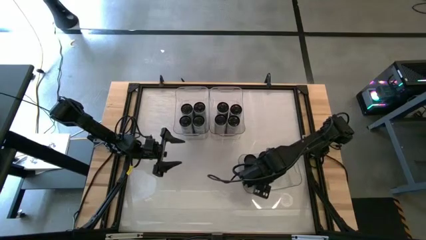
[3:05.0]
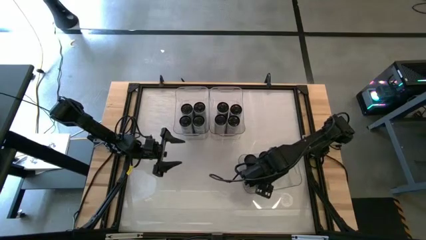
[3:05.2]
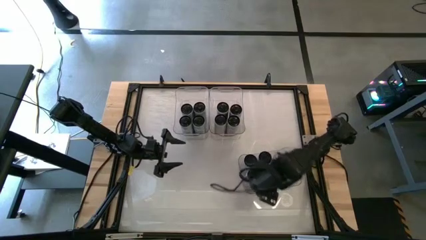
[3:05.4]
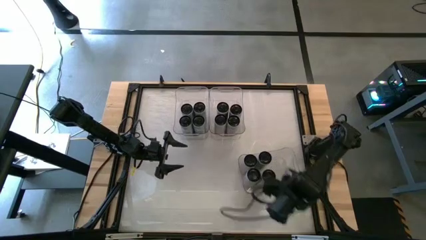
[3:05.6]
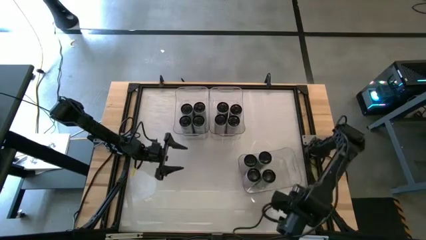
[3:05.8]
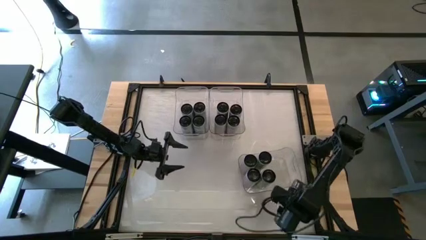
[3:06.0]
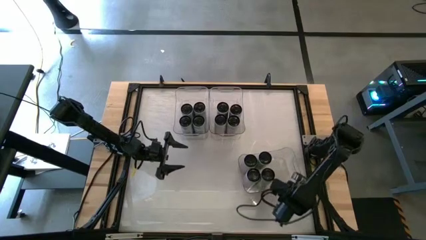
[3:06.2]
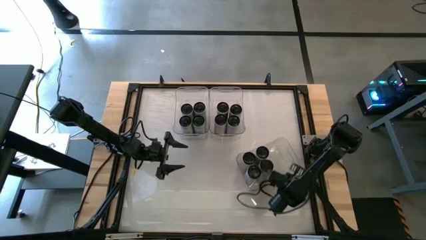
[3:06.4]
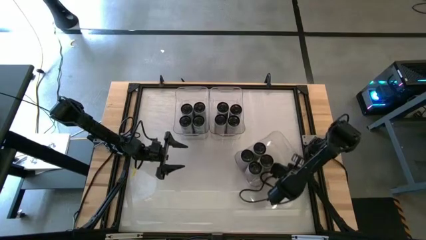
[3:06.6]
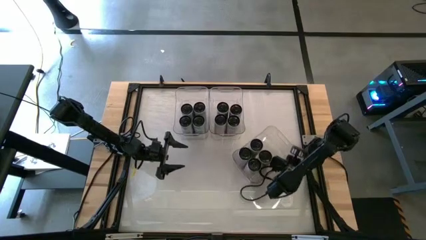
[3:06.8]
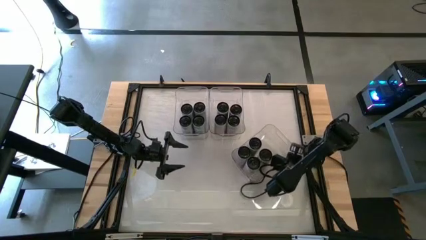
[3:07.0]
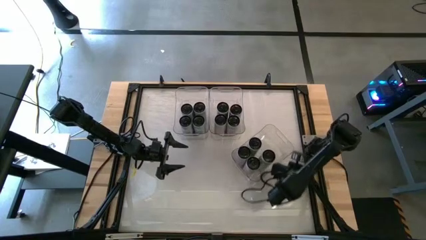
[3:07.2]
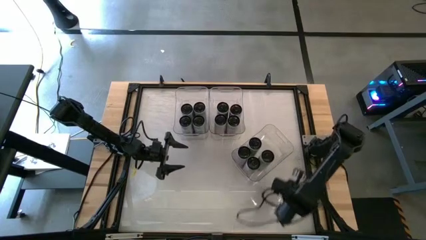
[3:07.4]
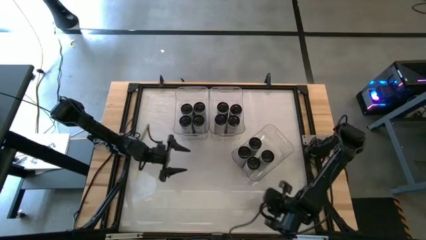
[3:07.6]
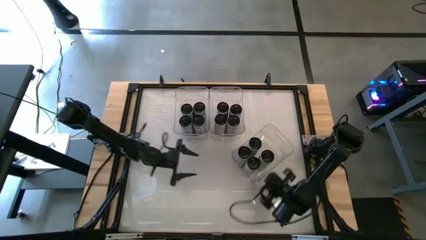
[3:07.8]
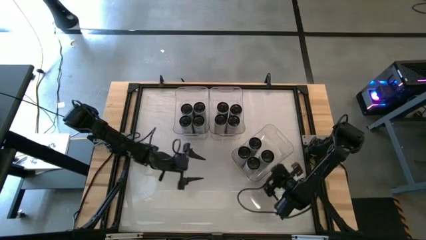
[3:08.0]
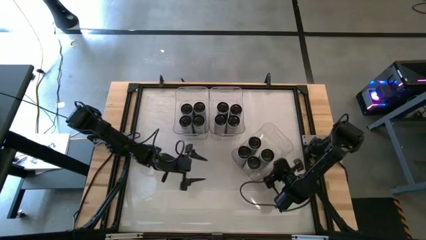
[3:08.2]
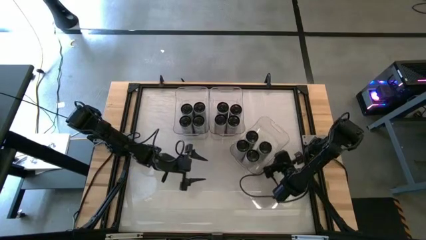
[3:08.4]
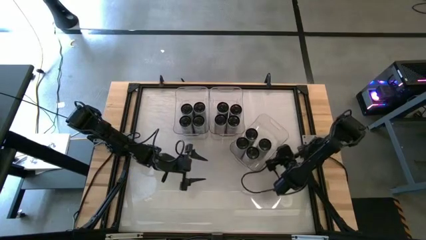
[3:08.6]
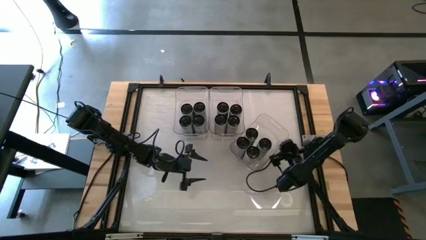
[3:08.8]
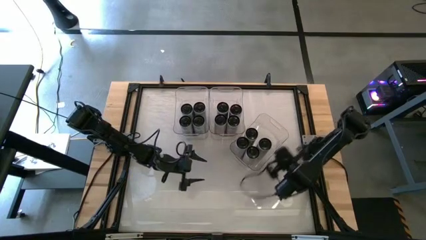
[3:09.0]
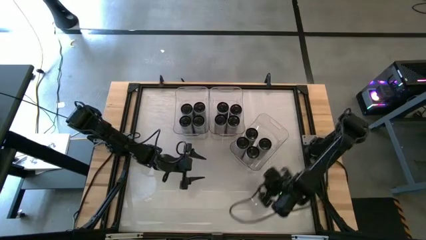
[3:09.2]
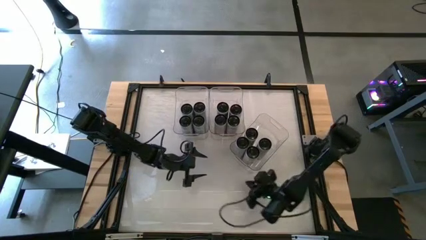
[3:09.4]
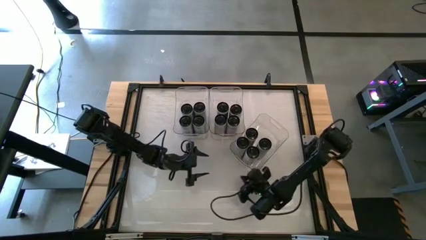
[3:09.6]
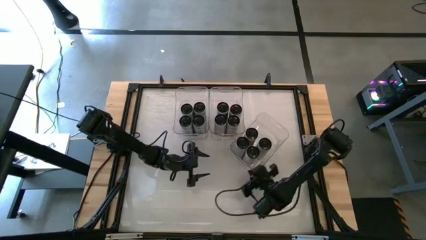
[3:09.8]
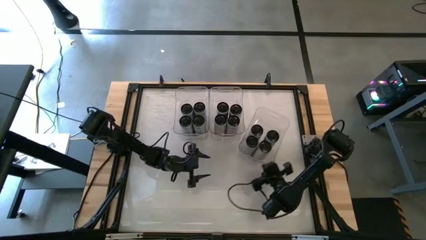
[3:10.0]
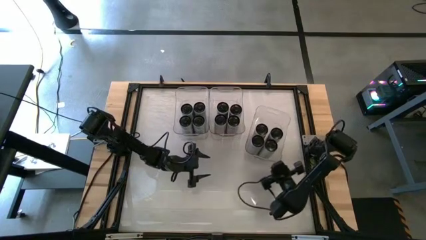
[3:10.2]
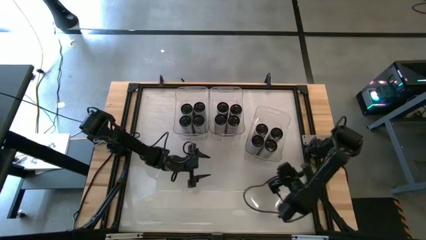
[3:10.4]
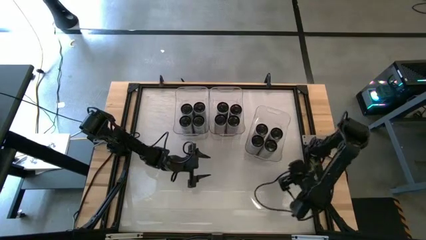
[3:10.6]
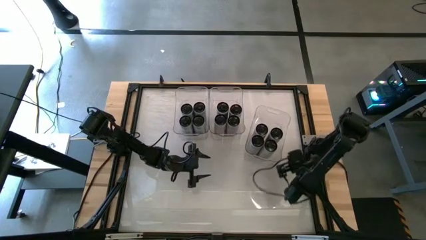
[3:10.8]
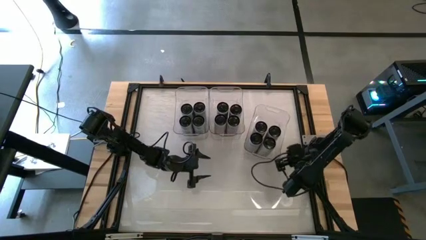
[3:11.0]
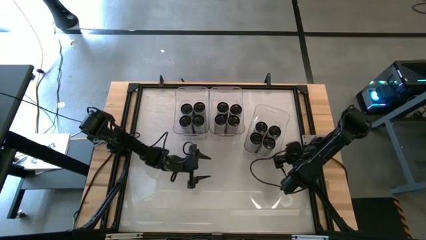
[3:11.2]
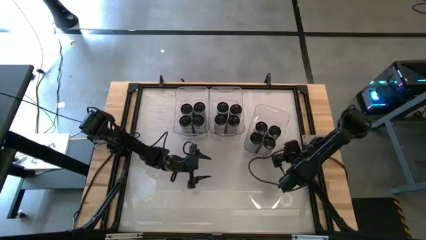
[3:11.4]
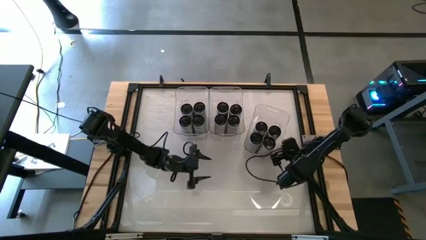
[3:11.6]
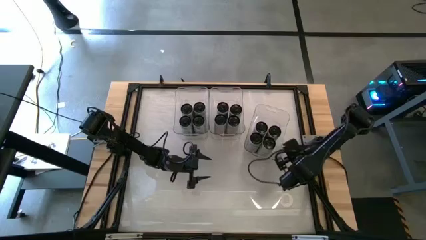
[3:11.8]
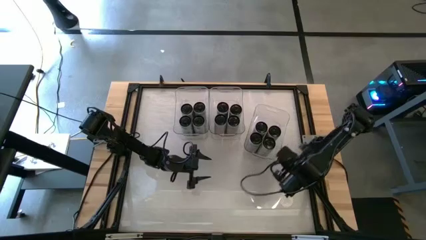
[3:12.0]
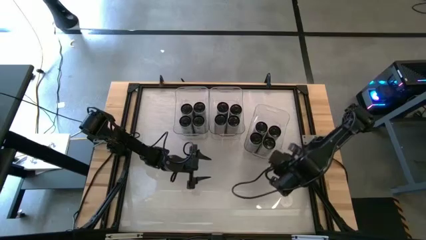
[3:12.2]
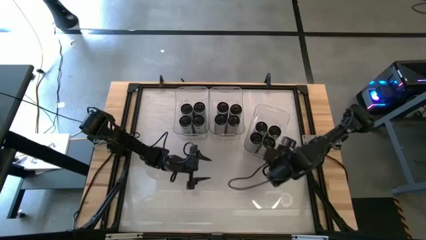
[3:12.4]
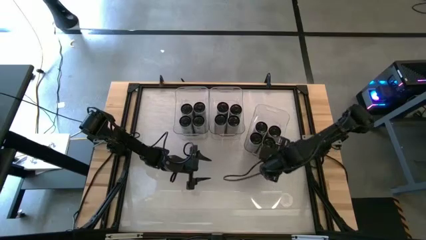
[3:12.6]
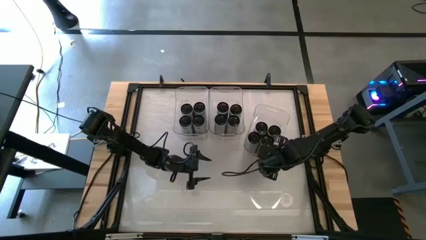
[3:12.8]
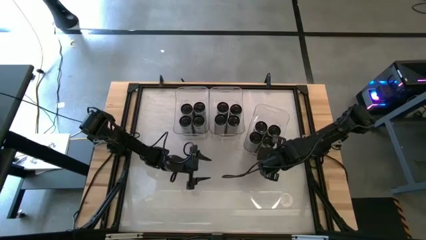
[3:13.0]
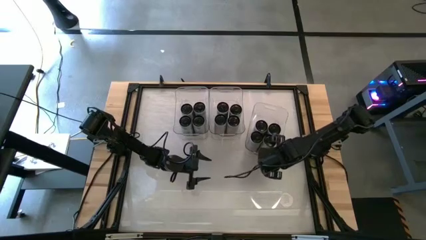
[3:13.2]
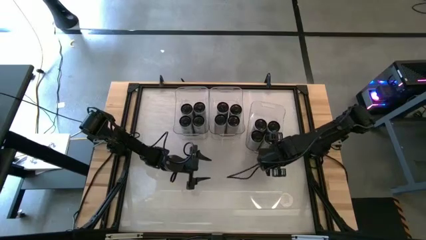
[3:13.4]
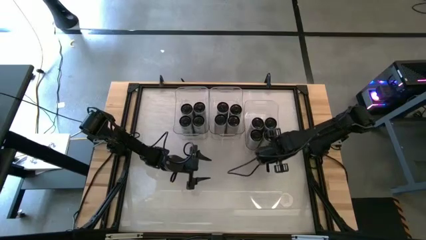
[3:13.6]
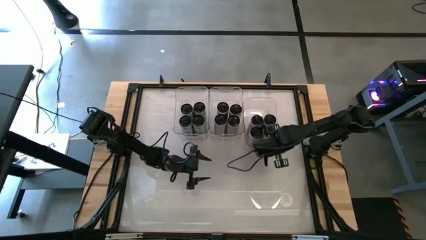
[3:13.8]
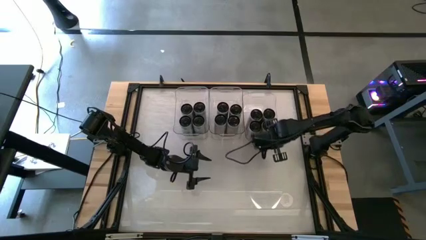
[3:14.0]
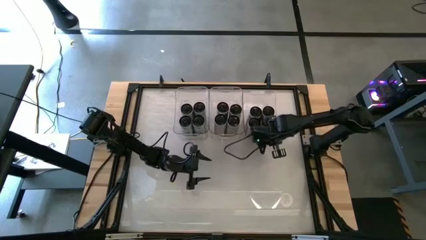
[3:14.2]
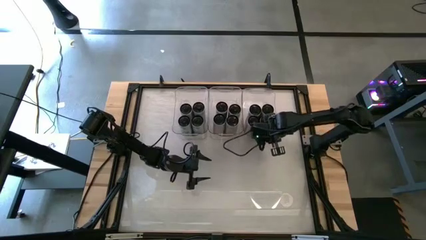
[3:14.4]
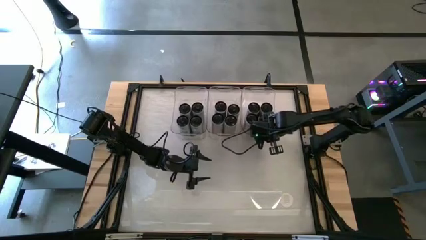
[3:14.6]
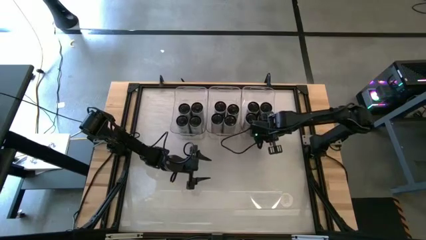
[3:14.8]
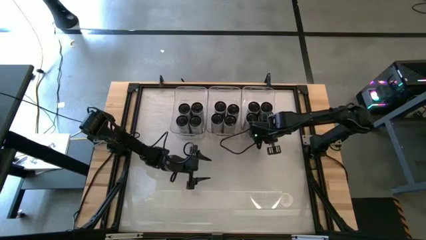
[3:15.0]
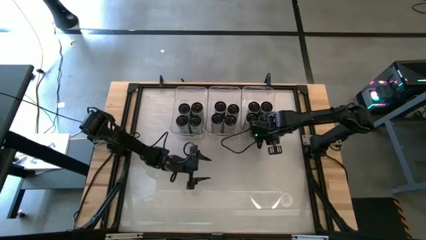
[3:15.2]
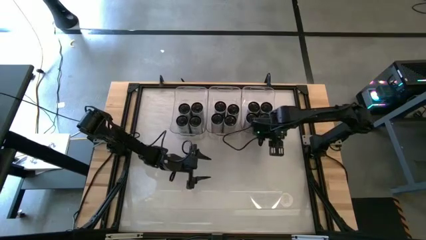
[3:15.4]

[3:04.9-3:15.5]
Task: Sort soda cans
Move the transparent bins to the top center of the table

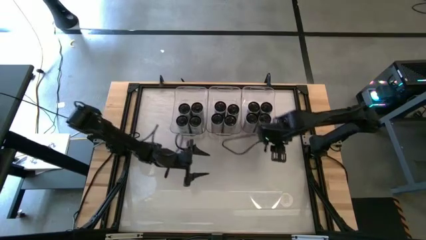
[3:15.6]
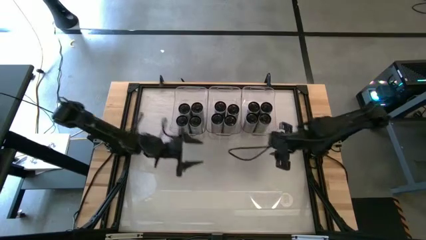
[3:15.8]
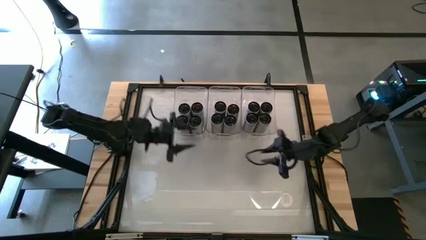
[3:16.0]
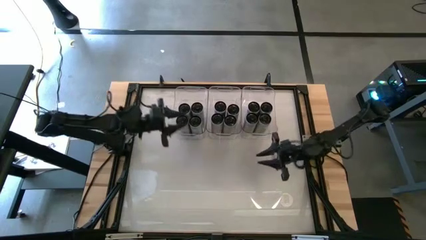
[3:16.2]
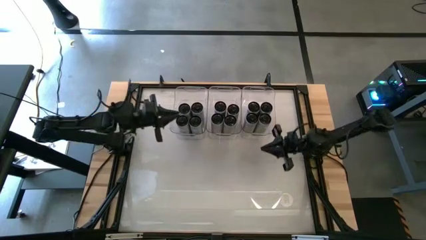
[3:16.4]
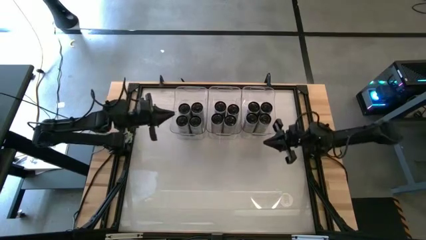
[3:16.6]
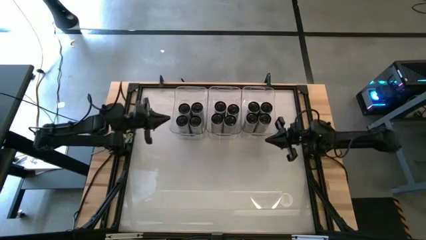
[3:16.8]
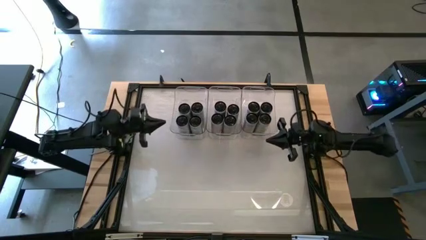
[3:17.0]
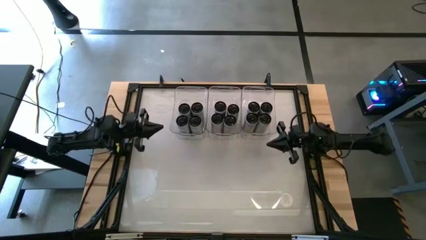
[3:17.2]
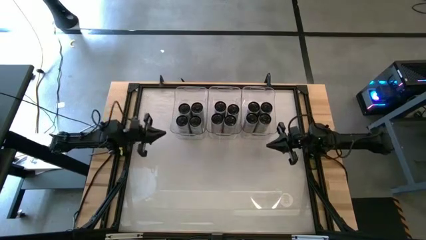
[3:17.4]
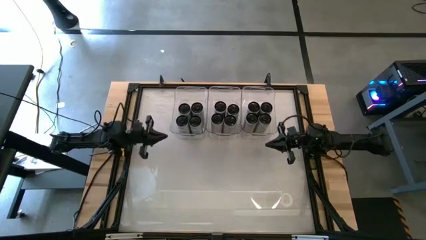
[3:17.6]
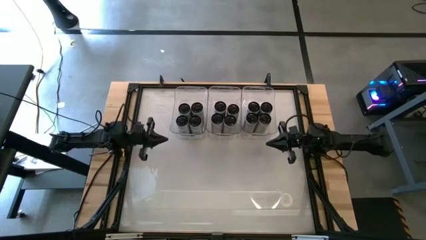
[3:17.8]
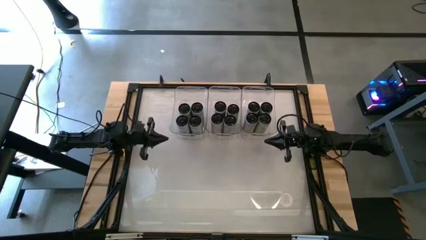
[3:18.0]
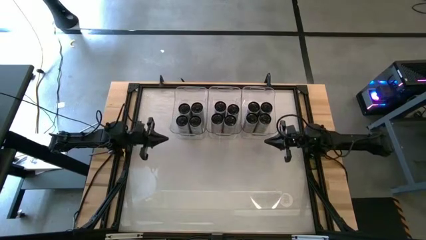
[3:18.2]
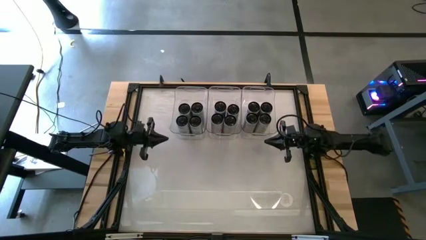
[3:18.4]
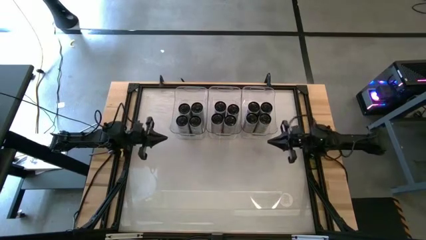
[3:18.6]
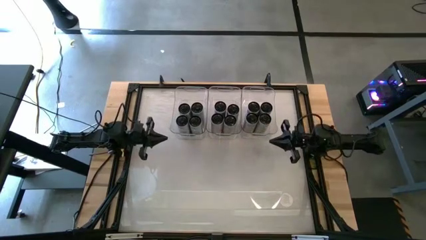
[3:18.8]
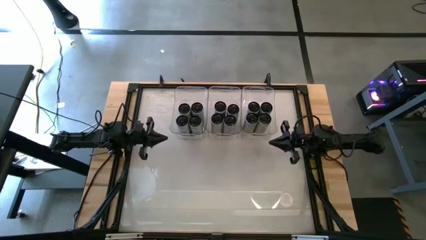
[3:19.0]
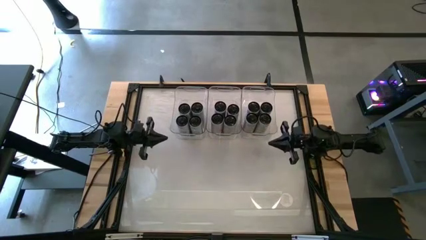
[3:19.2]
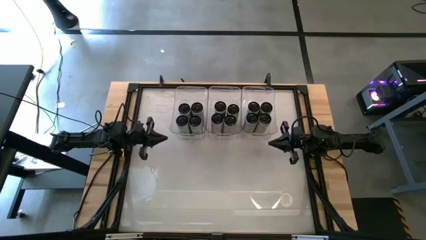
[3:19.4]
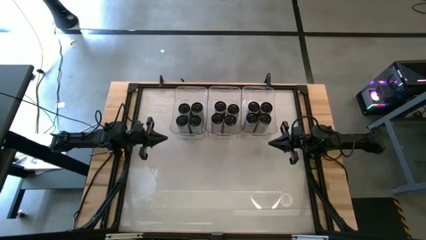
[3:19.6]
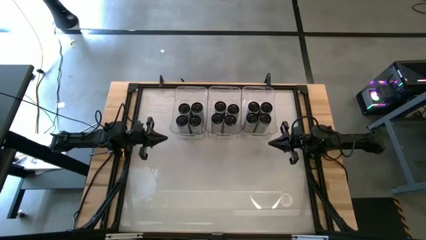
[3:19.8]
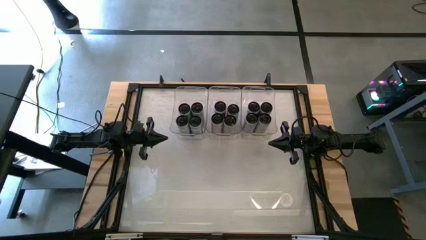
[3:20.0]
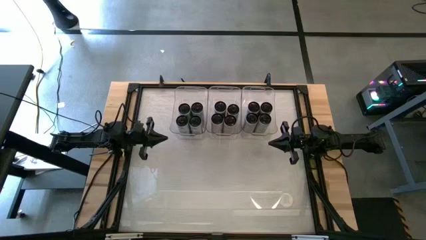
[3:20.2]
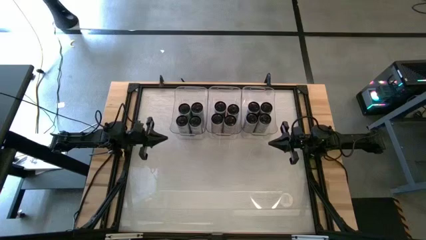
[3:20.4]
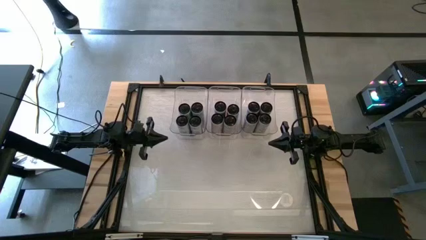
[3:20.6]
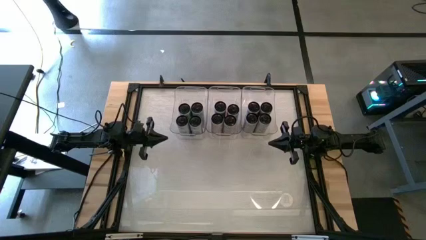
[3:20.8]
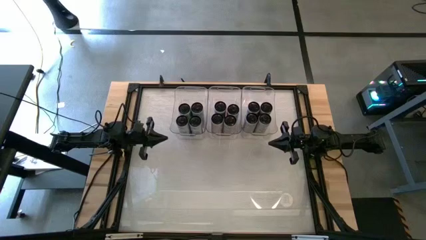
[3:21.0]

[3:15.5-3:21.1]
Return to Home Position
